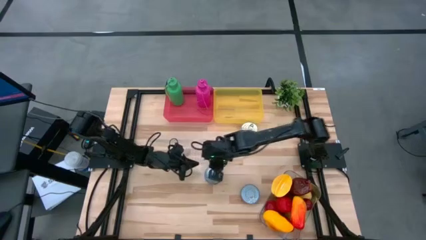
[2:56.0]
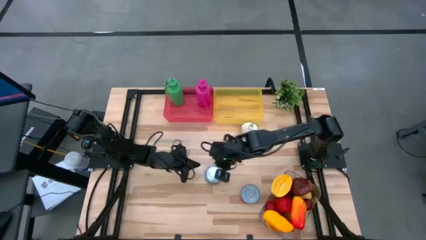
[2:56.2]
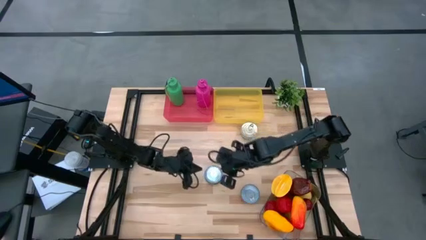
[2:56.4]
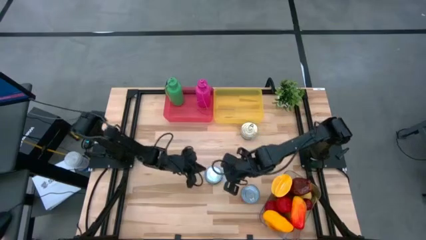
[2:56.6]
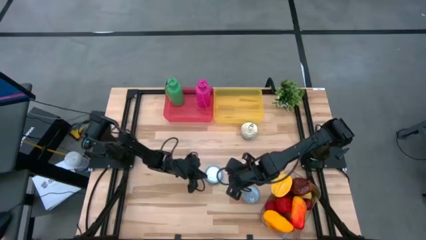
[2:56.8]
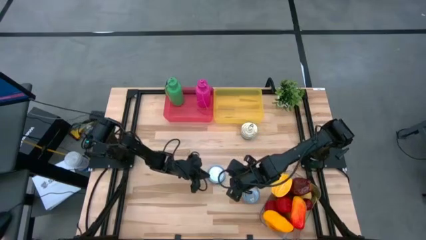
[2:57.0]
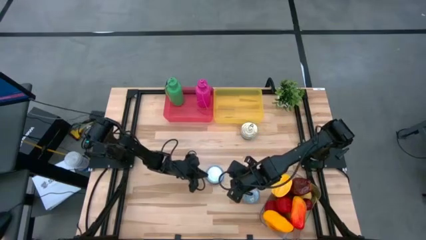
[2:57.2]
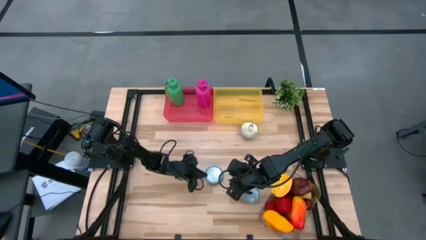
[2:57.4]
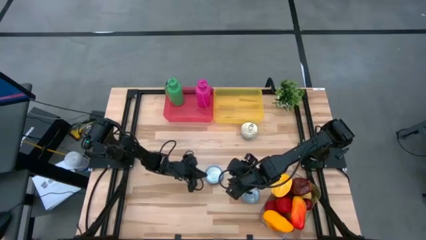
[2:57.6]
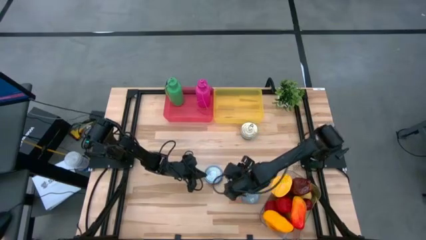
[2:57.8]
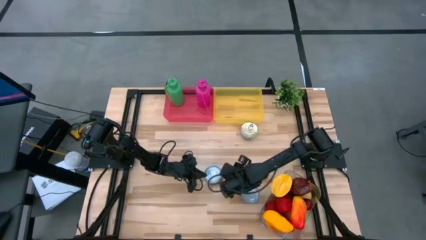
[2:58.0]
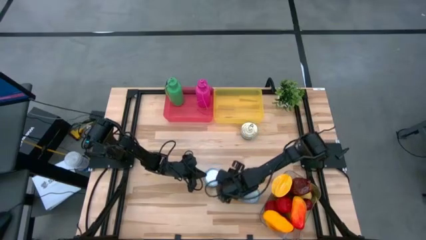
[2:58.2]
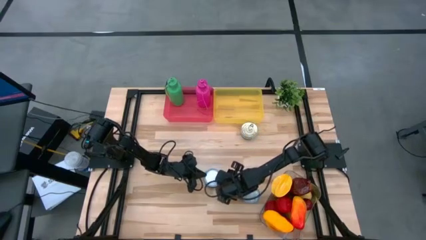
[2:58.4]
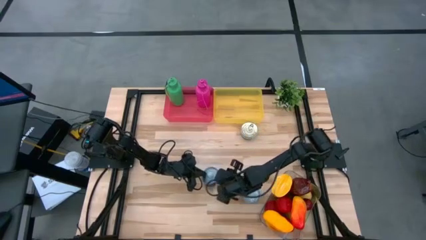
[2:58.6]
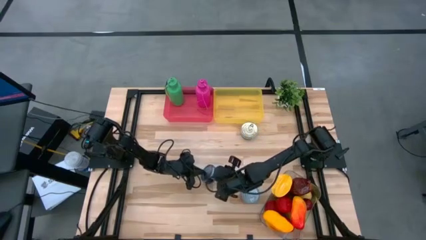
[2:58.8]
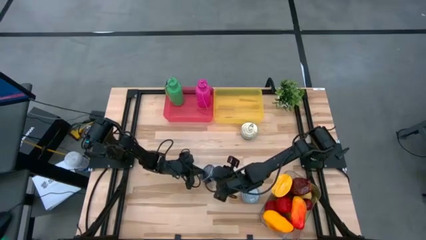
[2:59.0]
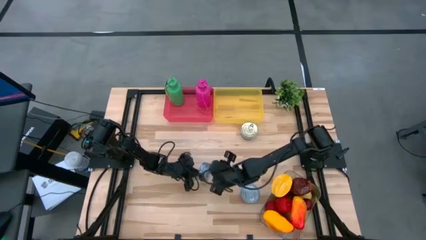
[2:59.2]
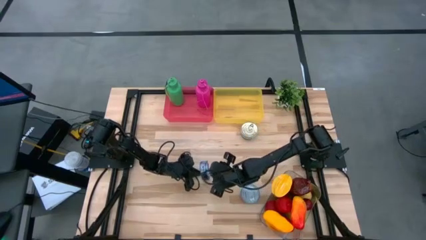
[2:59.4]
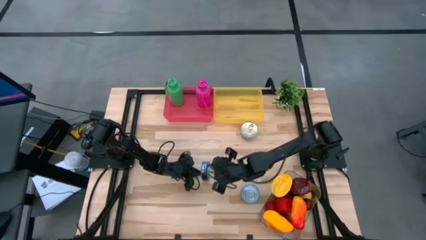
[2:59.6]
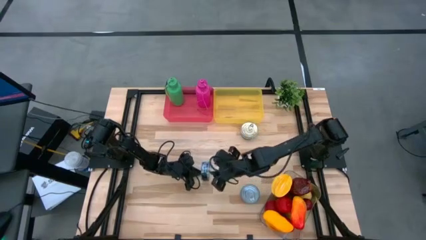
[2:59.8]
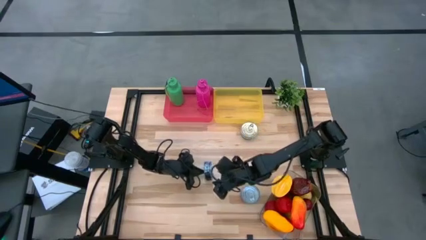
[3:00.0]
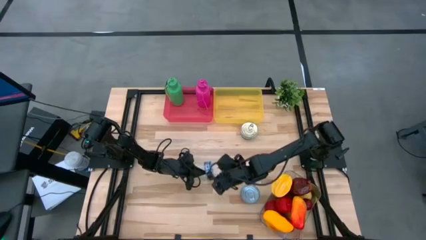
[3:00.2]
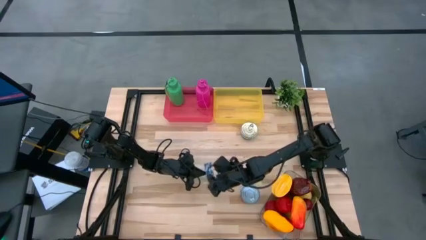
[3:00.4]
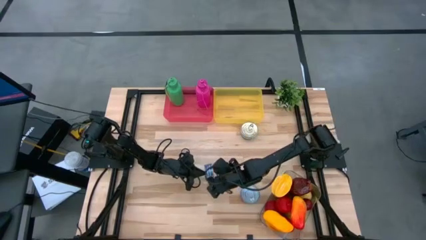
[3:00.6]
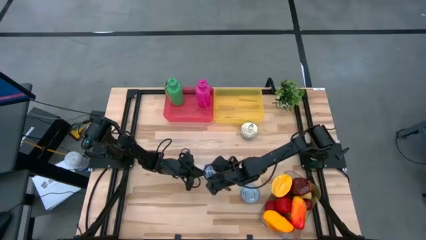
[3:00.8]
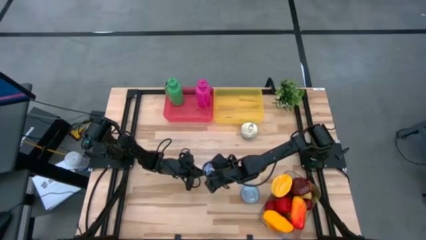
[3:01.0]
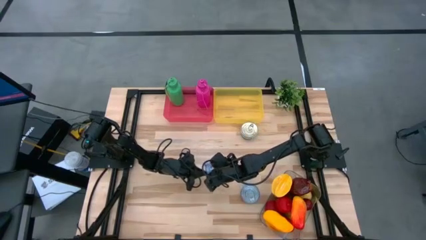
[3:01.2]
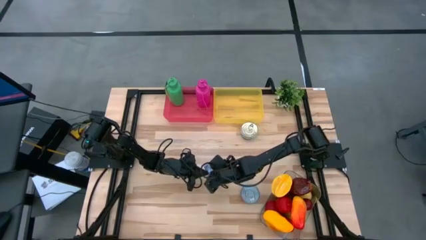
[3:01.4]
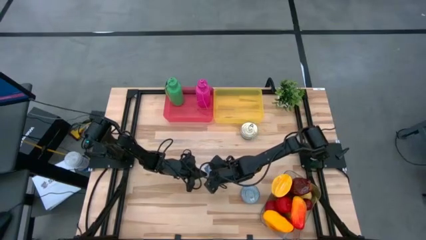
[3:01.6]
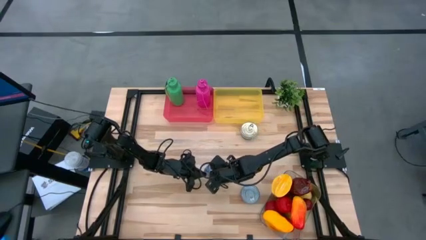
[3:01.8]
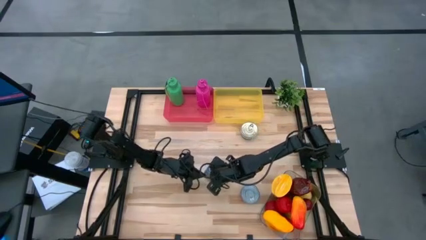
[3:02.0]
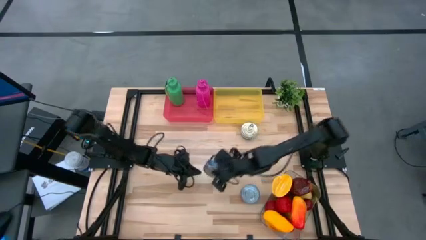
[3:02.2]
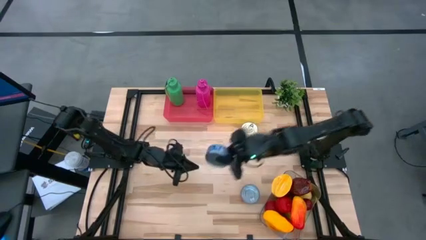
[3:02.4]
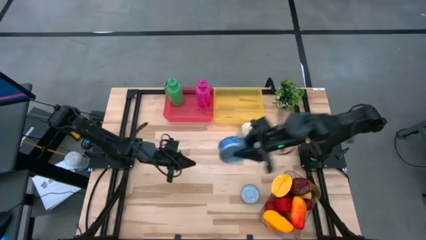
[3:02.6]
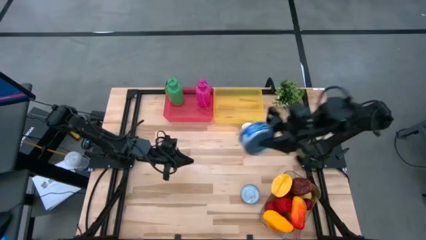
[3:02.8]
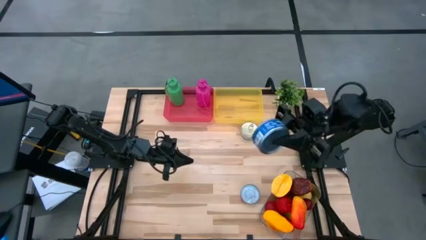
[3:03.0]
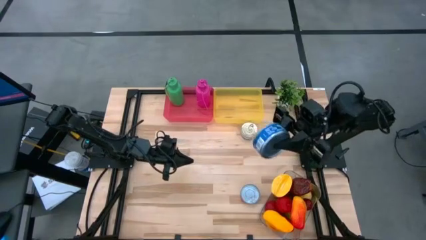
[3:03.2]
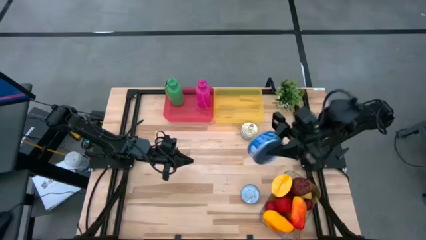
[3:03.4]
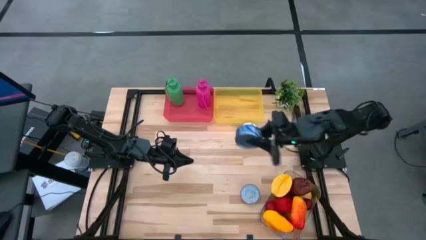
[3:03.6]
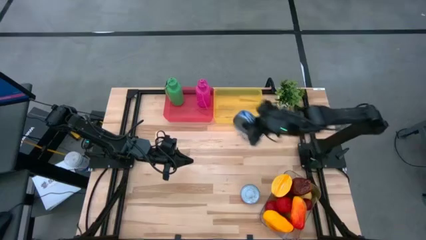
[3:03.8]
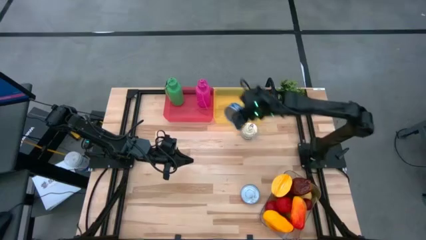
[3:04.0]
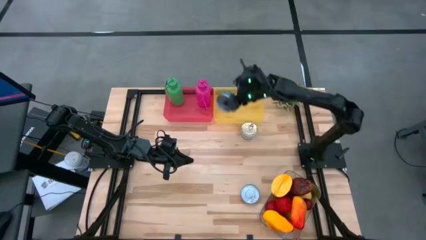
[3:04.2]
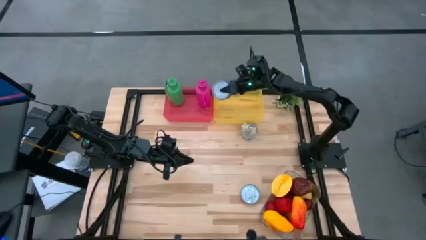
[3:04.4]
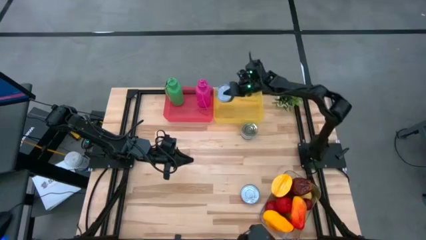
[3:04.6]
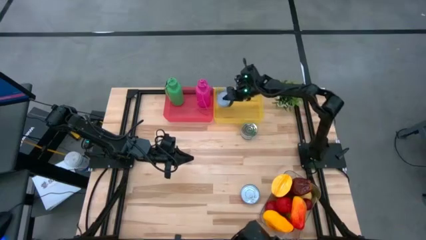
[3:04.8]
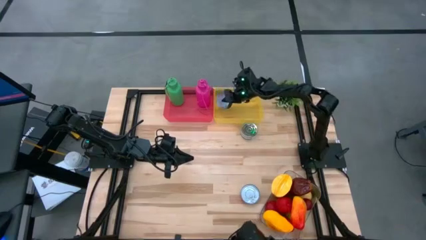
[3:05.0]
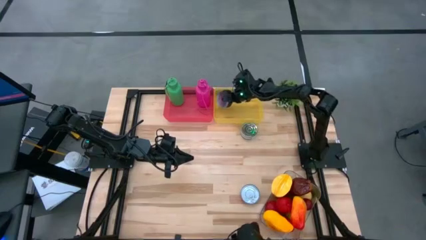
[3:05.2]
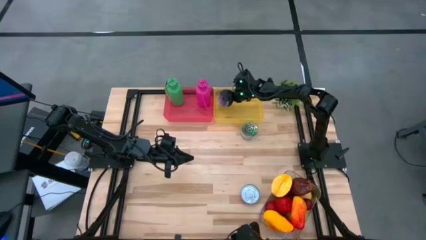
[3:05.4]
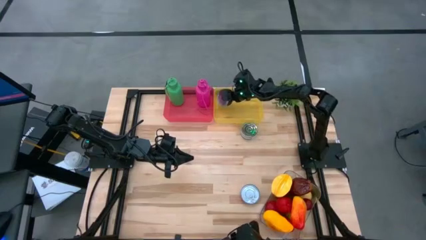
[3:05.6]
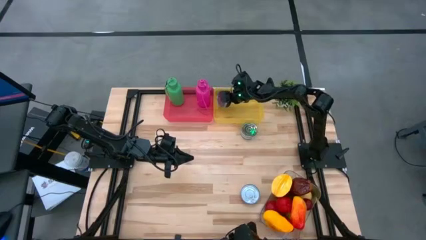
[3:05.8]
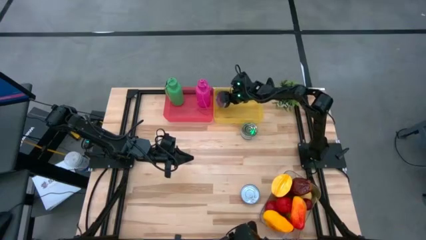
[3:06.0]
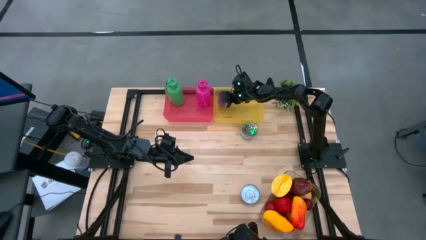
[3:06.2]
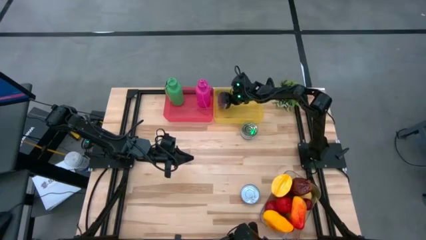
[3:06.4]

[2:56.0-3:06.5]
Task: Pick & Place Food Item
Put the blue tuna can into the yellow bin

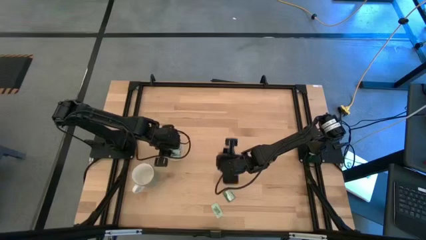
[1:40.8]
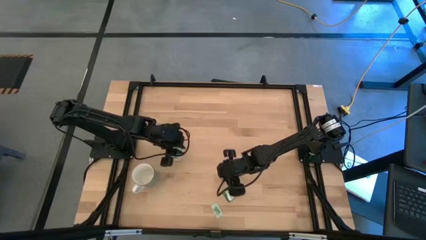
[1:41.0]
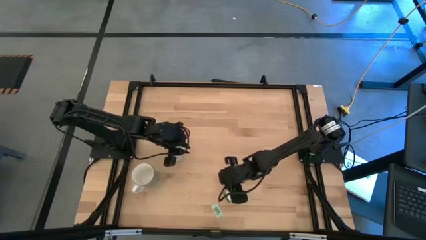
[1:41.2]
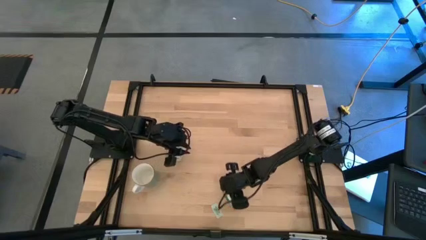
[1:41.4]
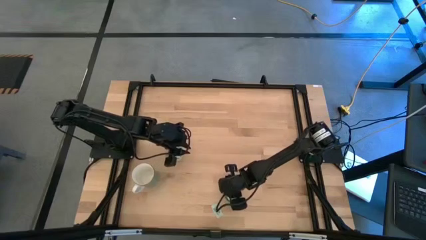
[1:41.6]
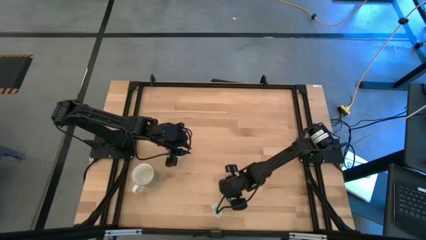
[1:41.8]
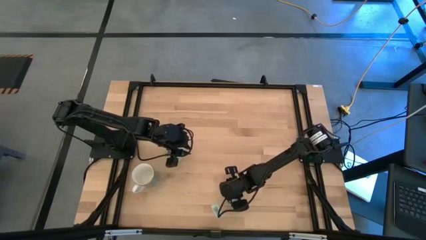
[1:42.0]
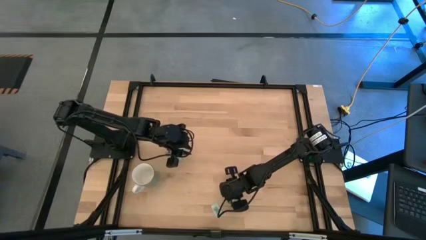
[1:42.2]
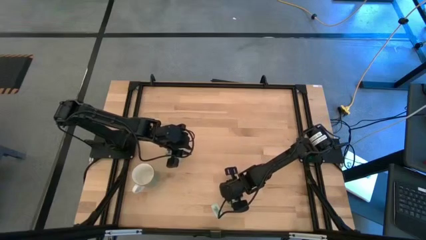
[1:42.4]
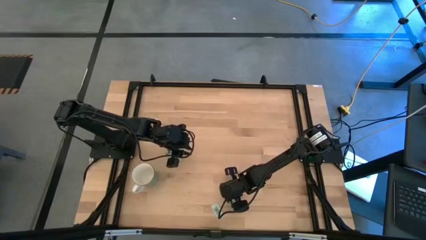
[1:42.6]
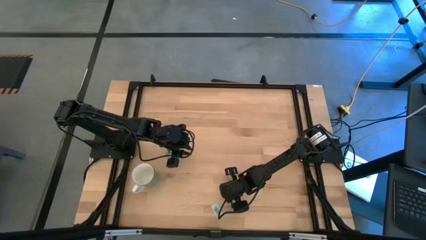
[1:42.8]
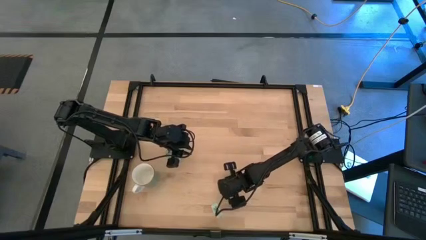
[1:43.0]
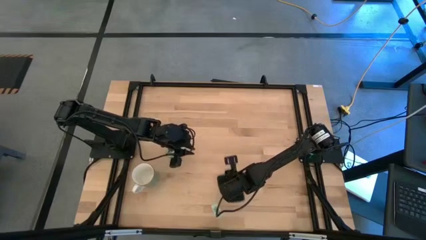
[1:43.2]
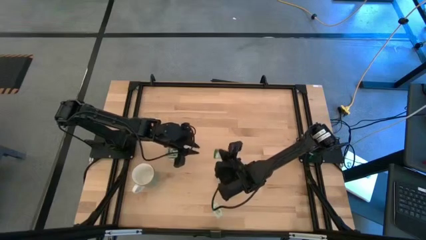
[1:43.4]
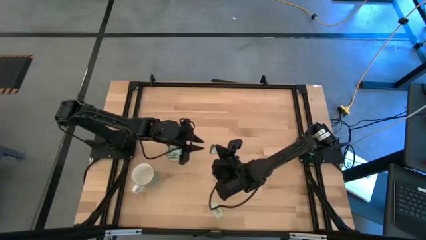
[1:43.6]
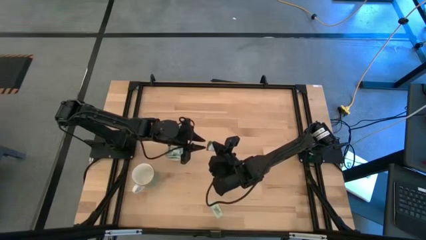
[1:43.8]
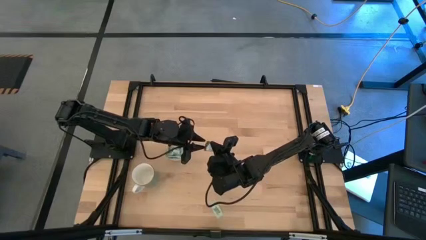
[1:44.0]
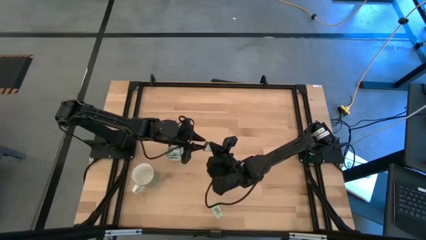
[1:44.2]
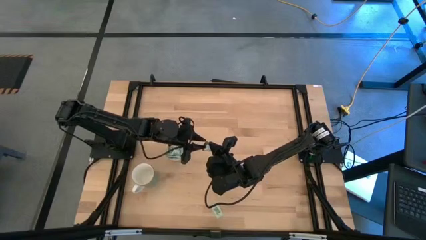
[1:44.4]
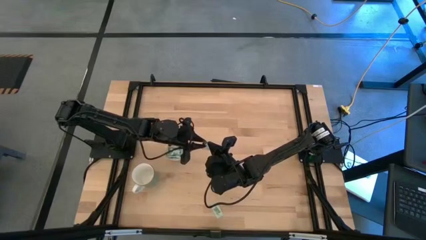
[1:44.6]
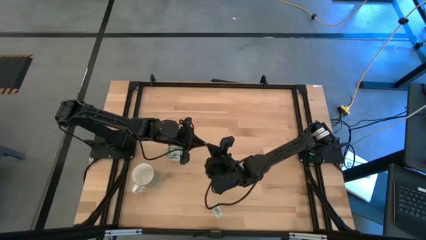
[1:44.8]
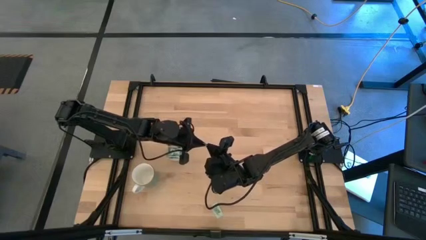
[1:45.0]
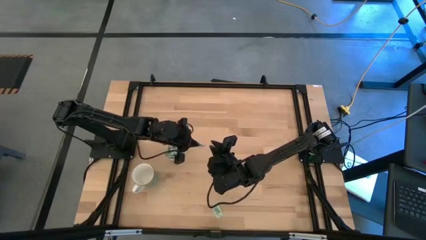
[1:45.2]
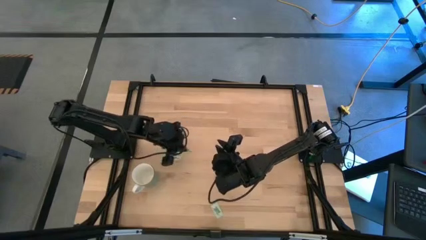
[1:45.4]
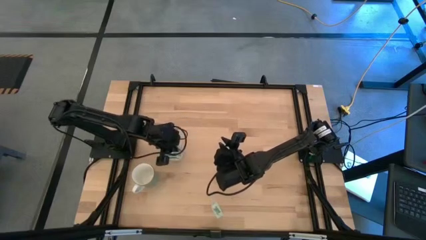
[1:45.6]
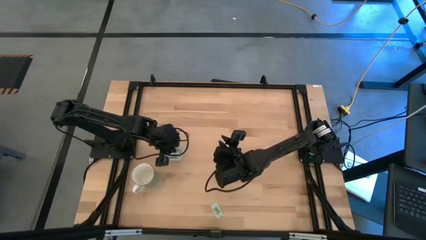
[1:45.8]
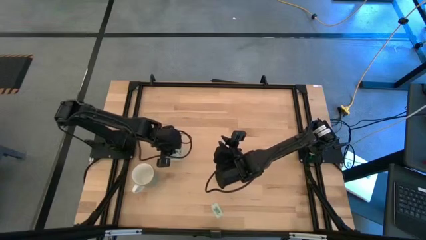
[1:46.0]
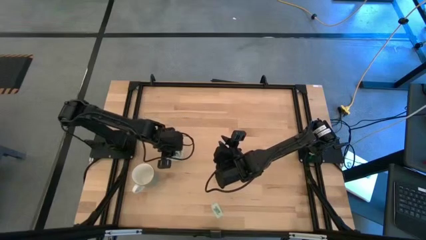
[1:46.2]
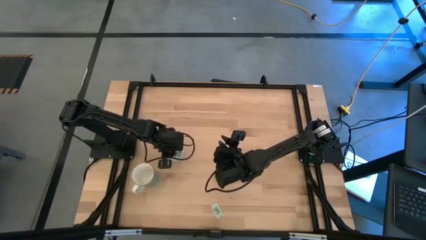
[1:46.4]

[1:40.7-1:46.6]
Task: Pick and place Stevia / Truvia into bins
Put the dark green stevia packet into the transparent container

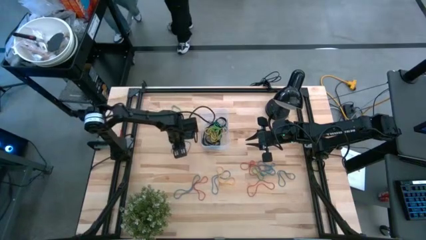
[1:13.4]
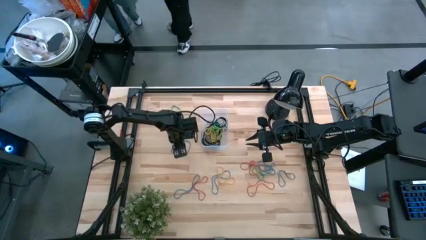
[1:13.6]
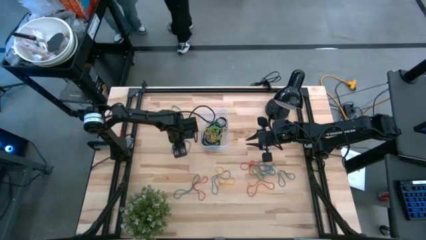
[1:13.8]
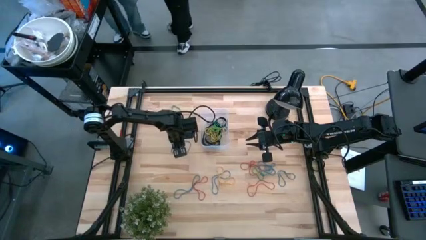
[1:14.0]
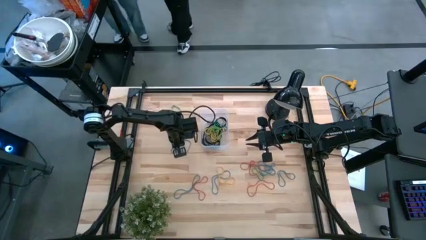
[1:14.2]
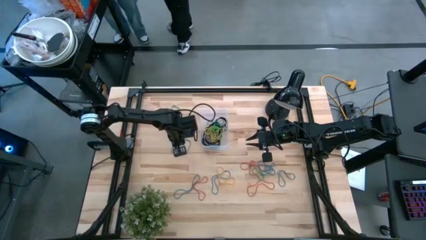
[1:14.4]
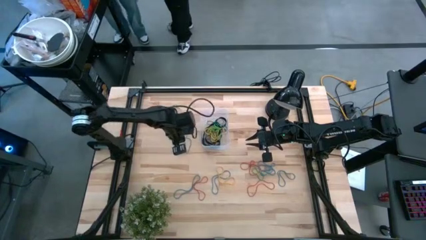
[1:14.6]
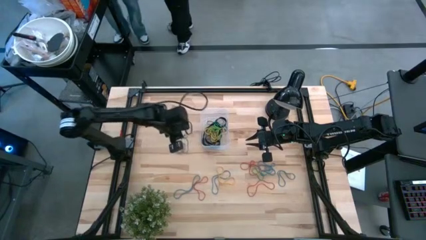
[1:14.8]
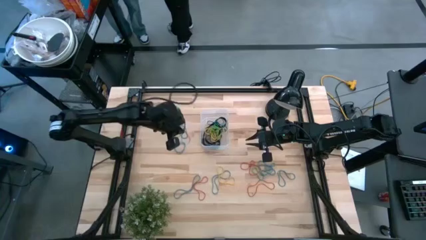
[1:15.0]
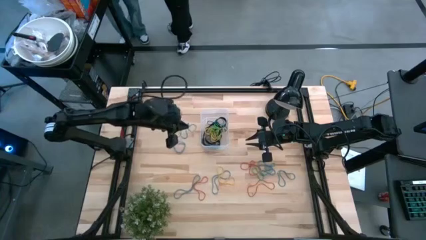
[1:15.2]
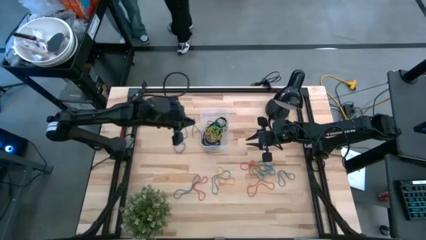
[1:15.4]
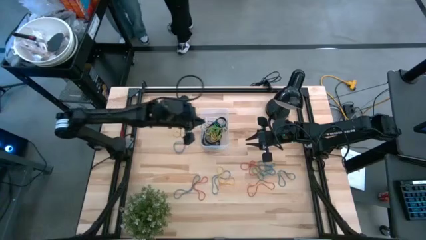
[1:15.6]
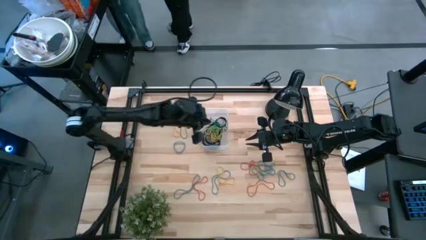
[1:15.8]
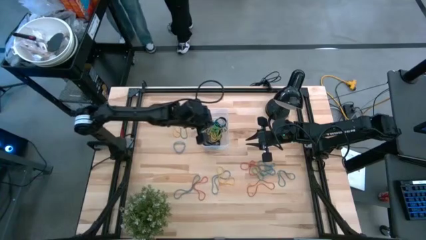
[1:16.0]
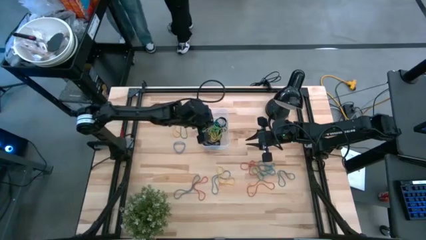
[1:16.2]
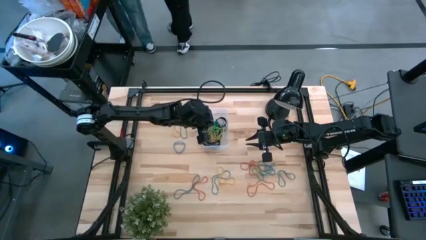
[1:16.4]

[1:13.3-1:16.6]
Task: Pick and place rubber bands into bin
Put the blue rubber band into the transparent bin
